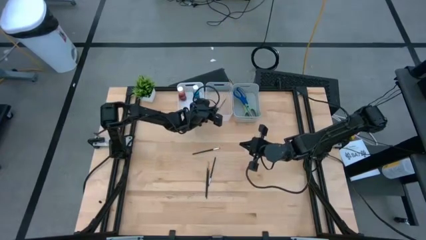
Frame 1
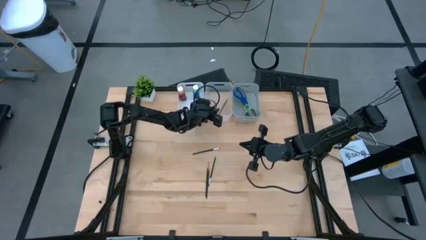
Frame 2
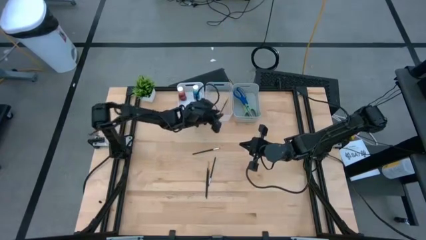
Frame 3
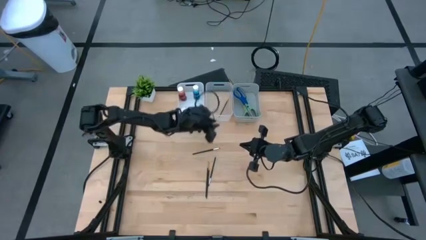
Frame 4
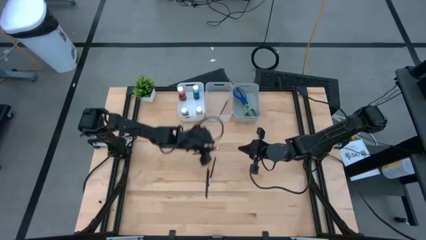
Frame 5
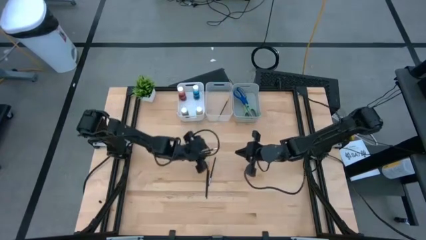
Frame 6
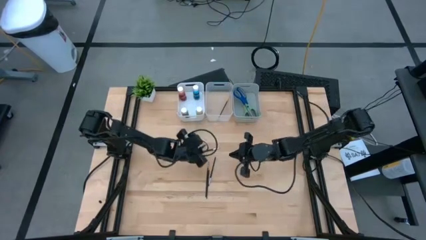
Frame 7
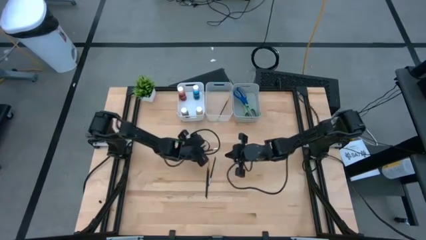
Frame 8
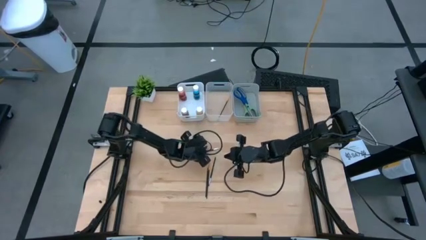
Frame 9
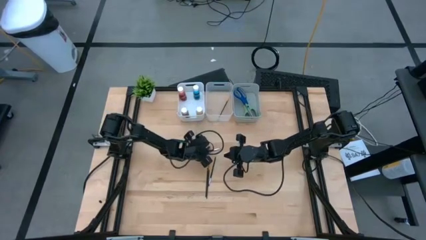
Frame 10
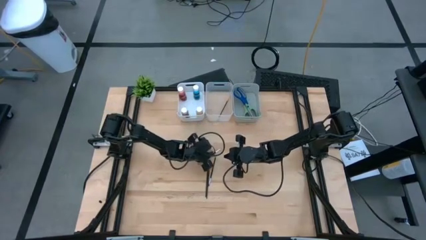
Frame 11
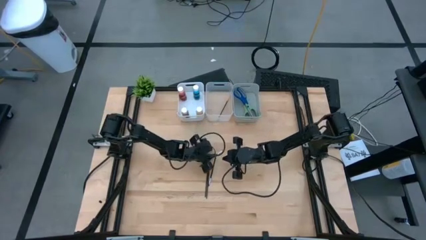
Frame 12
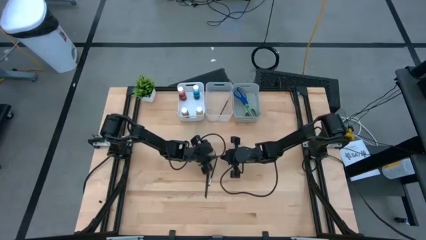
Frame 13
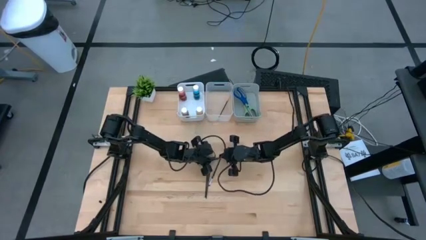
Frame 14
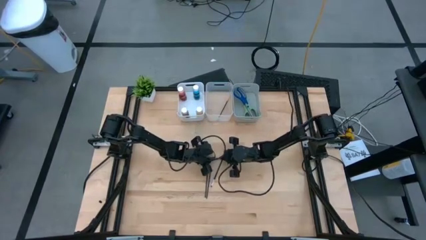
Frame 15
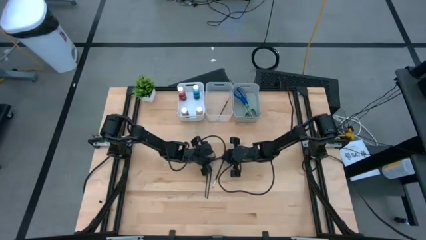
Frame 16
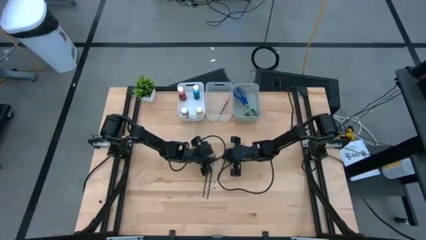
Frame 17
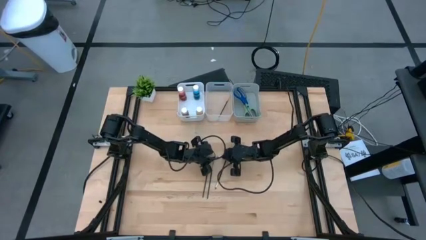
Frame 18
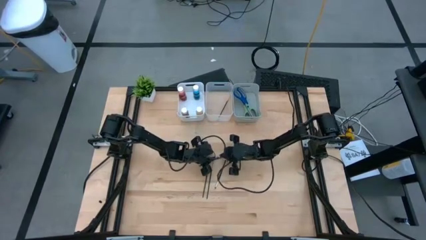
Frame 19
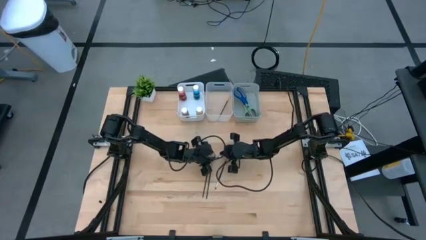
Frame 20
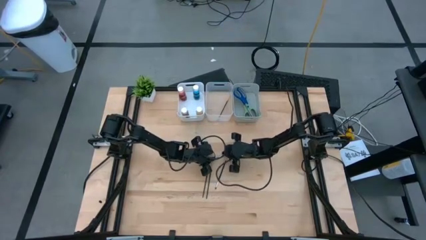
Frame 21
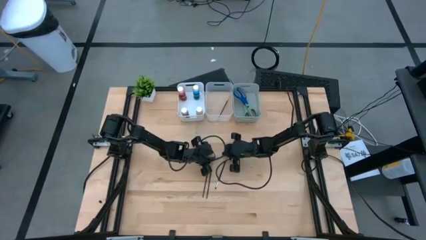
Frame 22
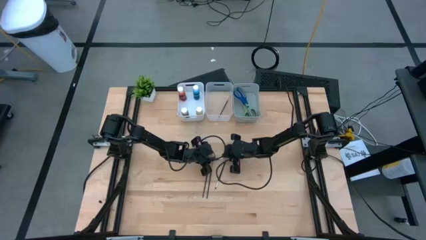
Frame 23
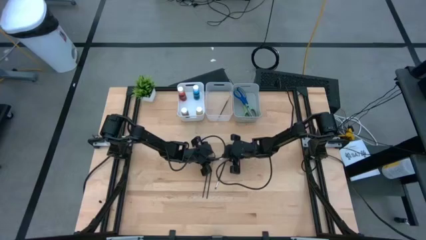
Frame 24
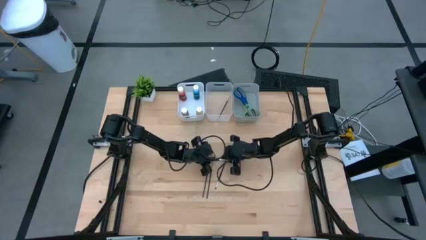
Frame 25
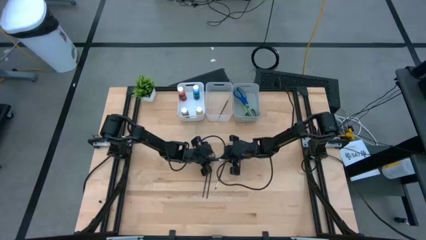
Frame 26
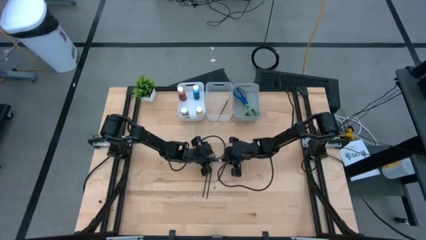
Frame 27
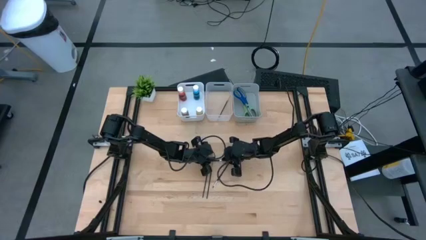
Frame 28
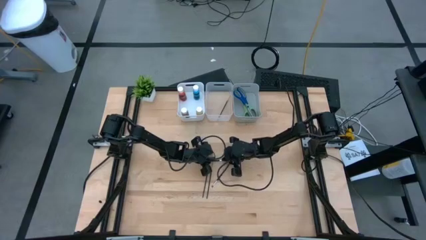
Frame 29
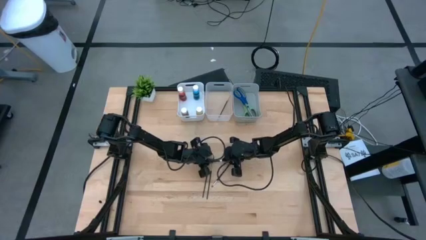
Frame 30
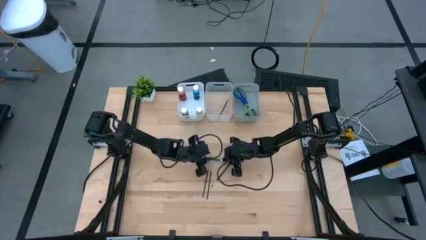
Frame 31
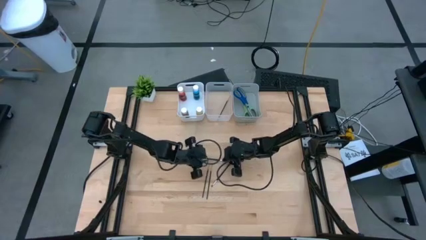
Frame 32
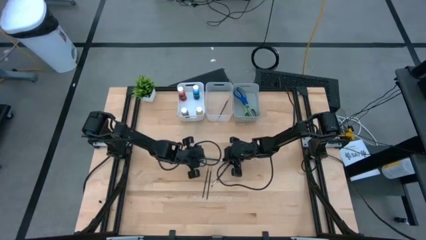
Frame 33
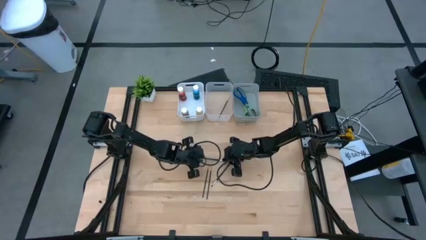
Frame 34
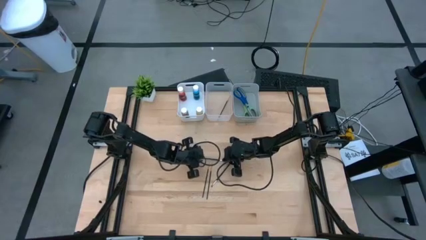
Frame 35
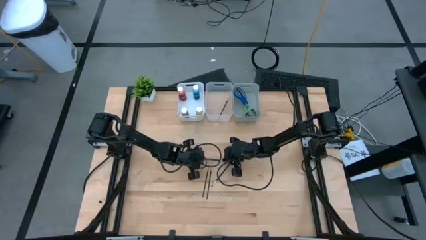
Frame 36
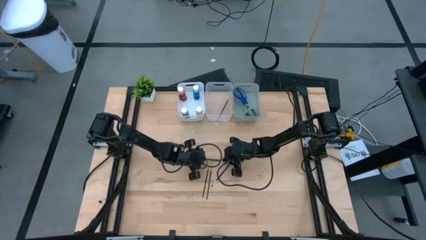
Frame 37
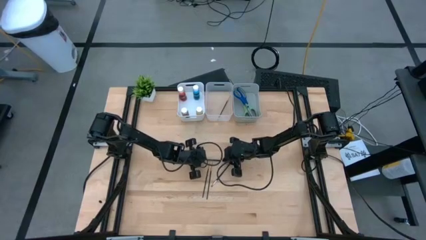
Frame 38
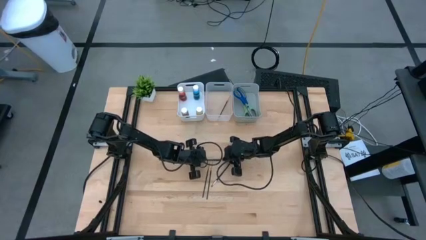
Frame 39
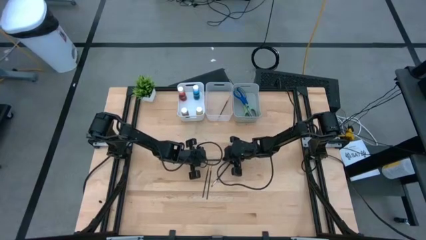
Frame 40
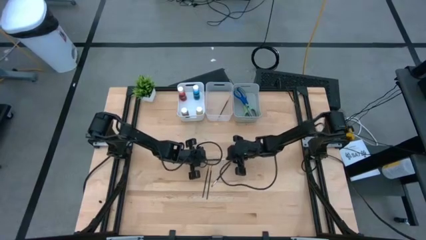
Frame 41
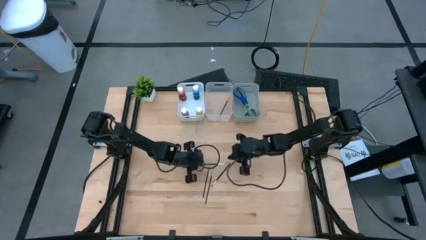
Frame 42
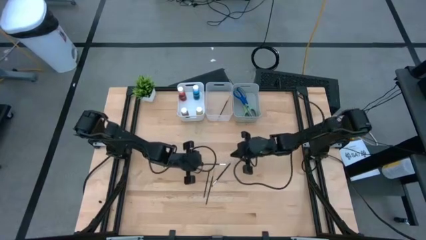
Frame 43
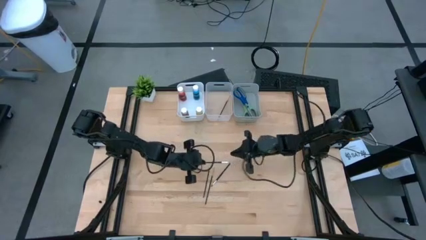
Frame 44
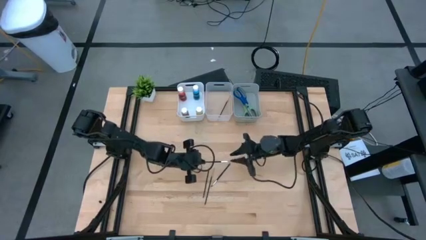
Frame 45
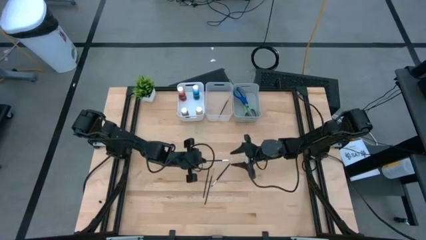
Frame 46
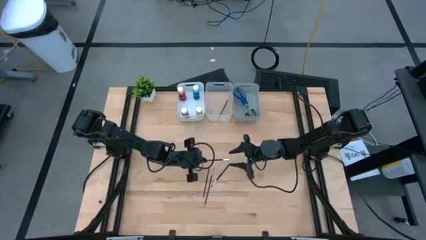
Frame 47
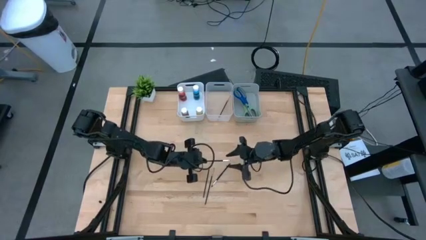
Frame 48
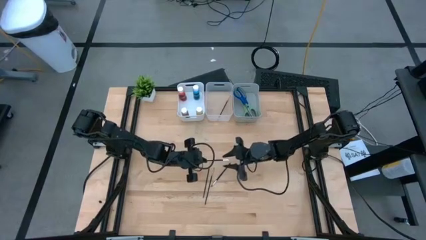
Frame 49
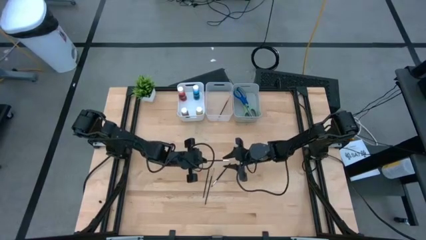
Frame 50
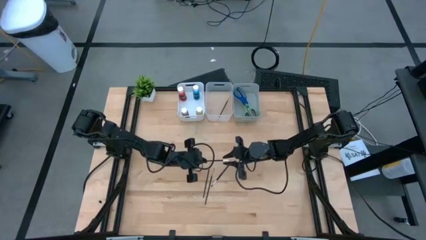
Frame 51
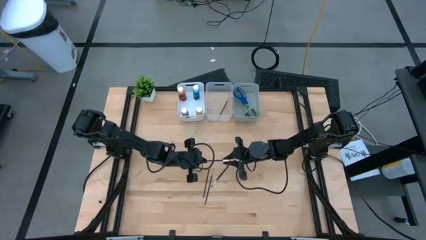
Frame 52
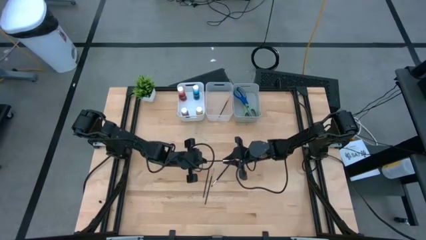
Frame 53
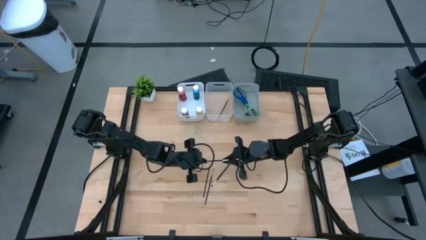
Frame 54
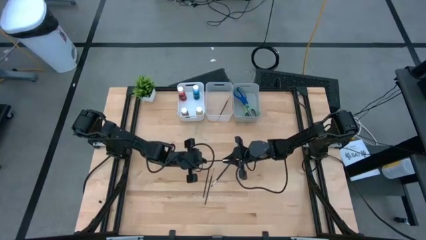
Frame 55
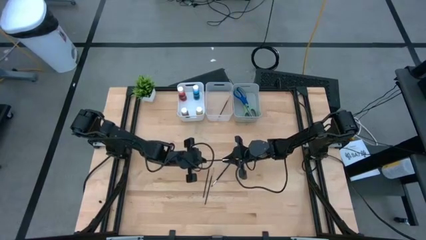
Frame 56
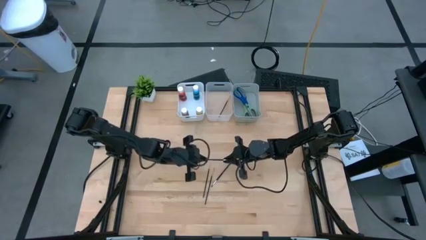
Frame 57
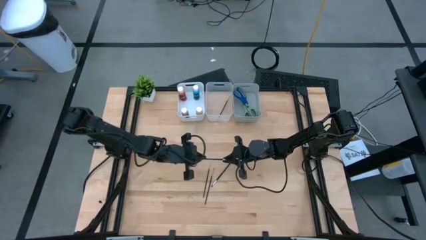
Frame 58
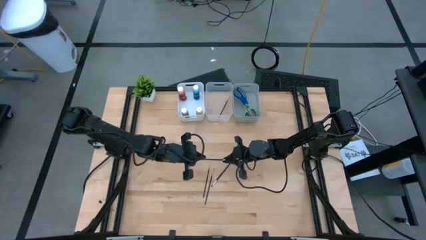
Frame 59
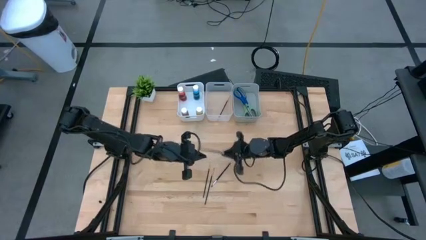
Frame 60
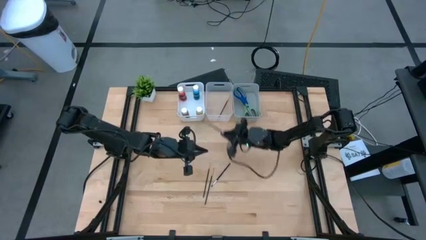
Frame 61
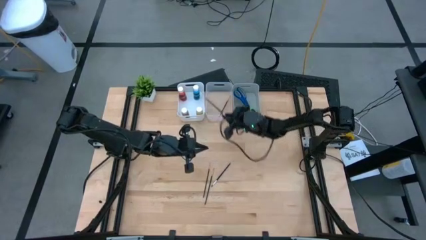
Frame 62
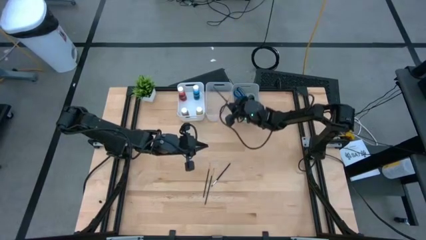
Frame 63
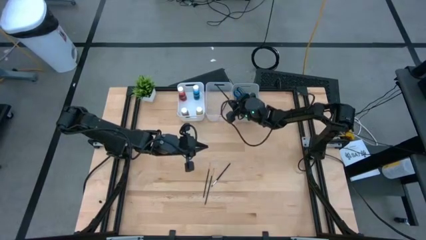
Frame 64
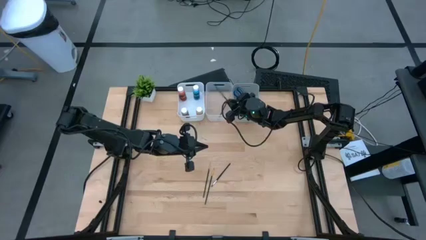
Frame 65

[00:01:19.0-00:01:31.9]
Task: Pick & Place Paint Supplies
Put the silver paint brush into the transparent bin
